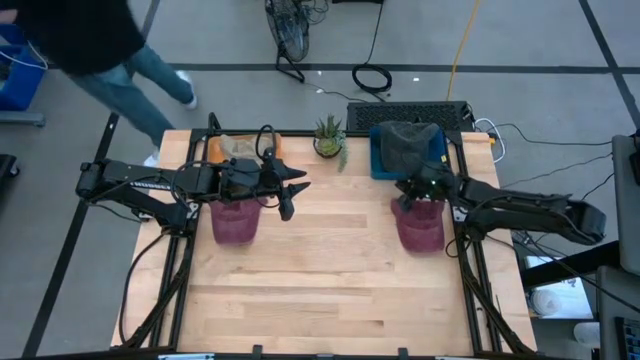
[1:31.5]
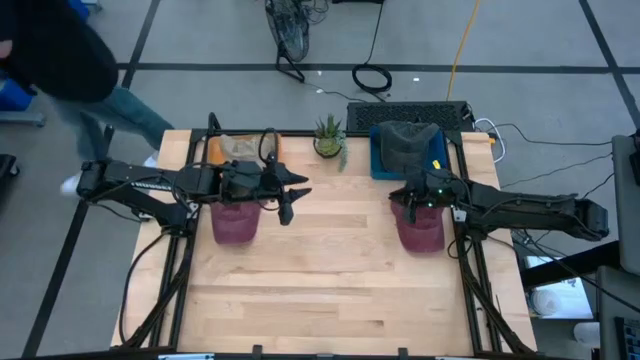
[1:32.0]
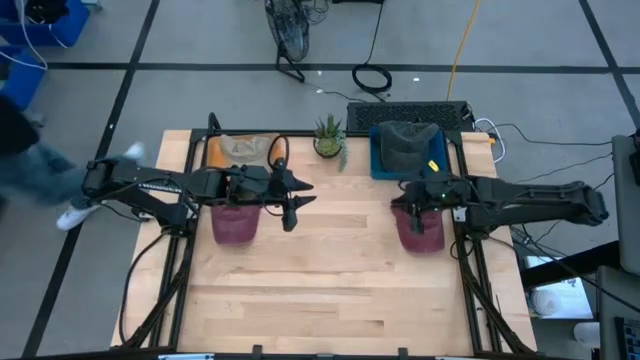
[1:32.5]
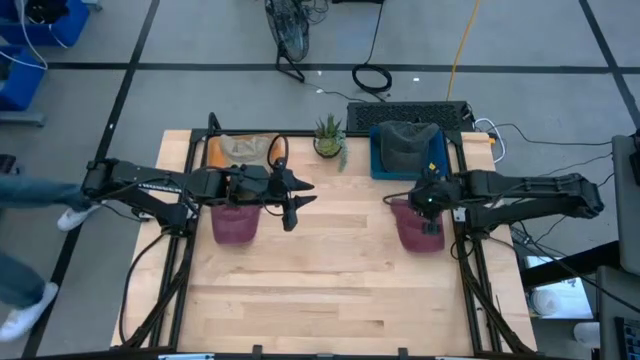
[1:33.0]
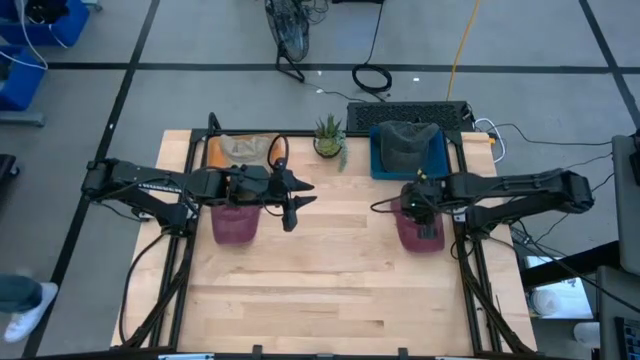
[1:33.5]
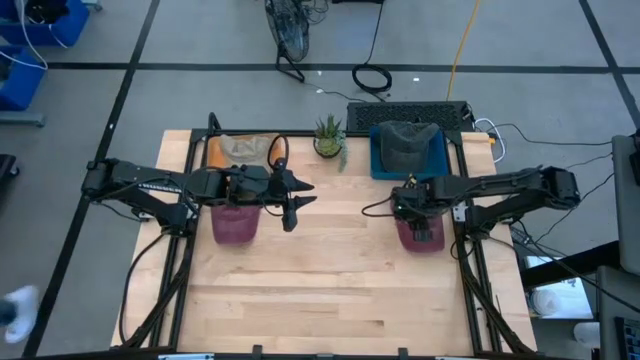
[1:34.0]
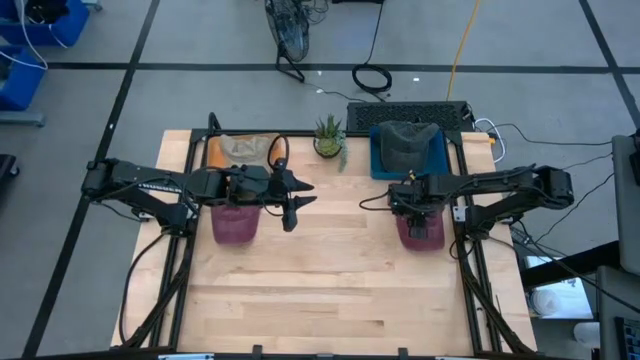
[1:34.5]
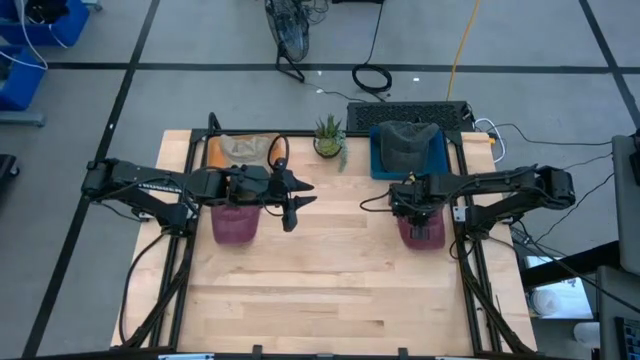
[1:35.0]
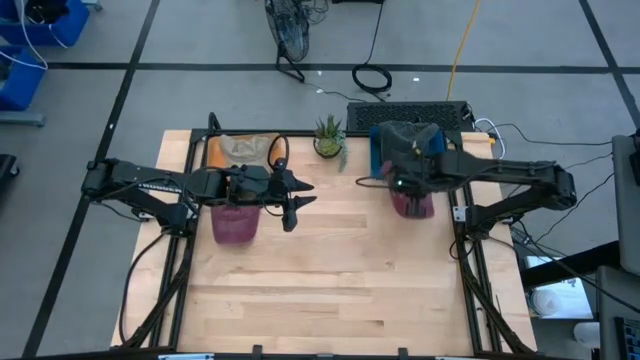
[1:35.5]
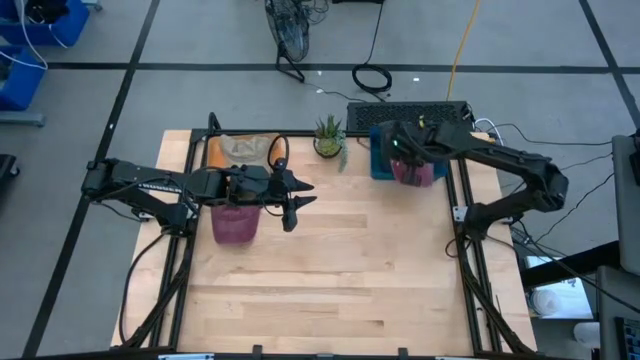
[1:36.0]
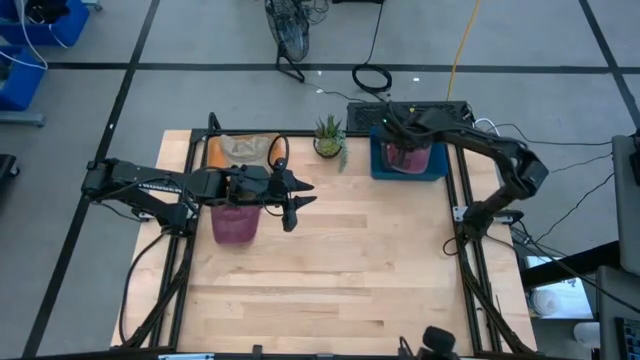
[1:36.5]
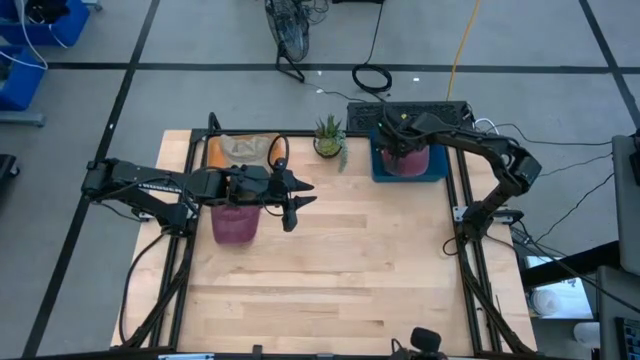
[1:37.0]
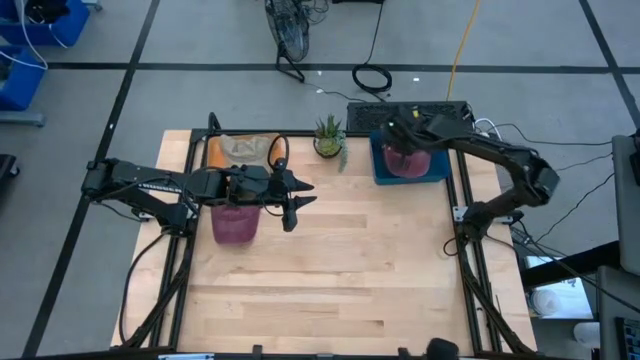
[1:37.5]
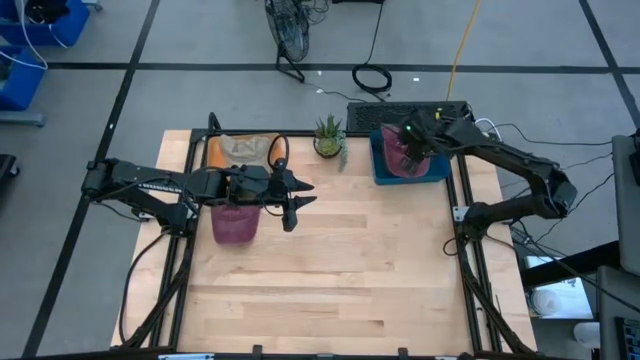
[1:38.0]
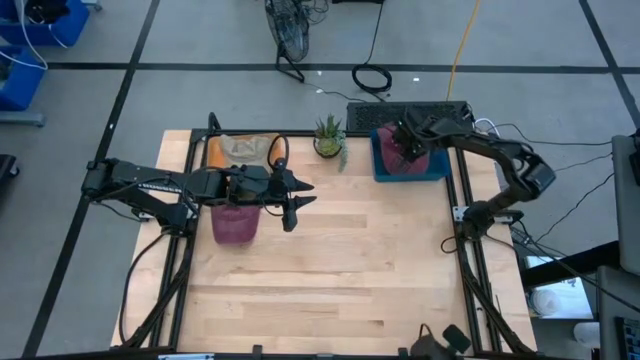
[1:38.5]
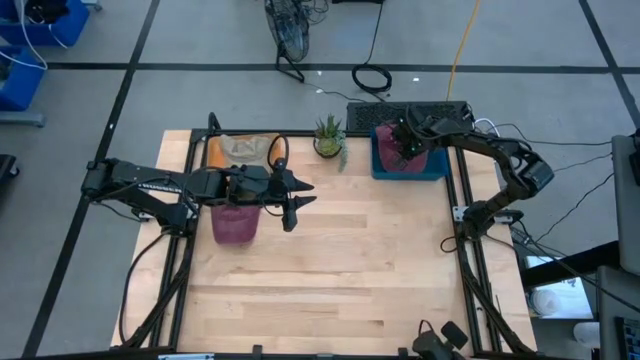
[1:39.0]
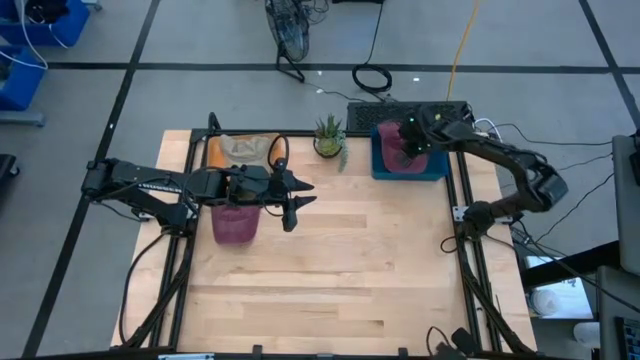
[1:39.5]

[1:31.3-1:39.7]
Task: Pick & Place hat
Put the right red cap into the blue bin

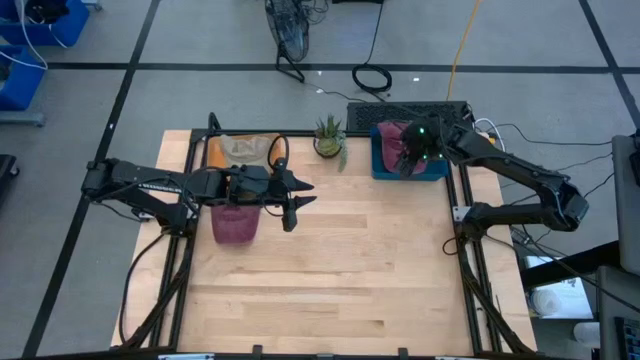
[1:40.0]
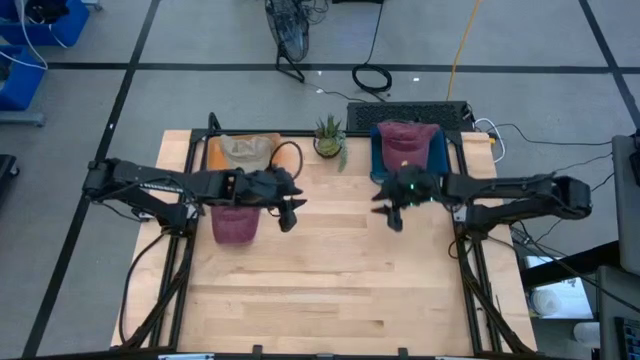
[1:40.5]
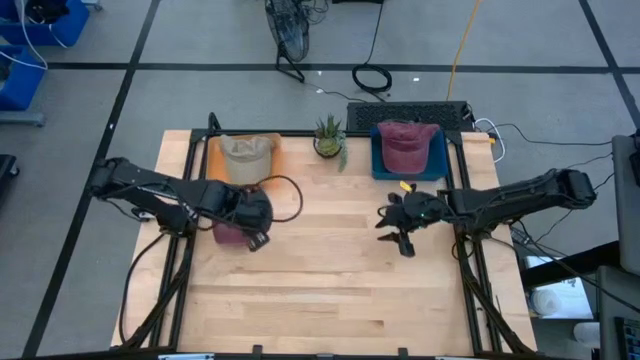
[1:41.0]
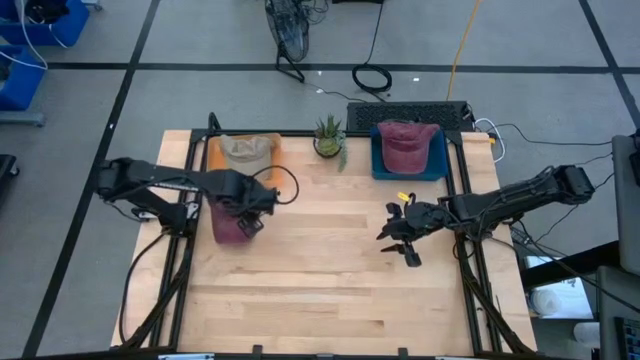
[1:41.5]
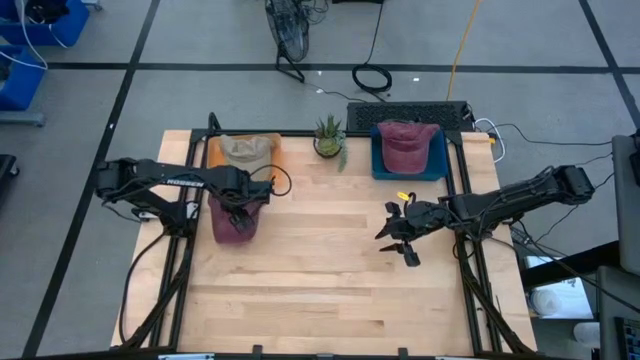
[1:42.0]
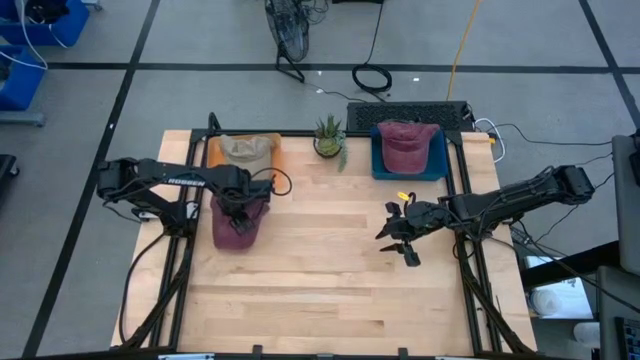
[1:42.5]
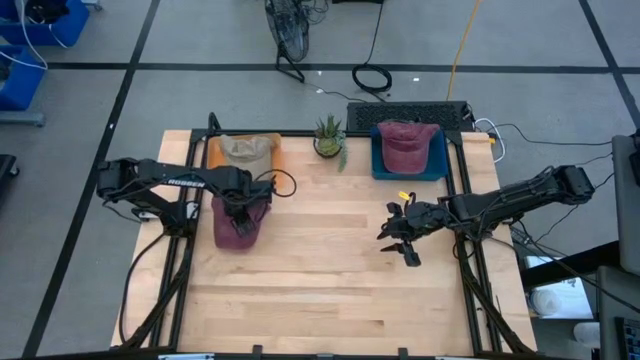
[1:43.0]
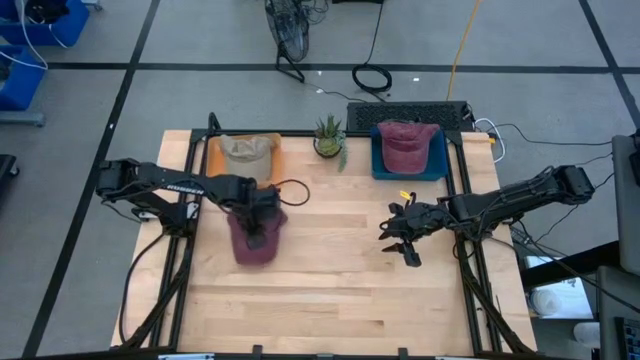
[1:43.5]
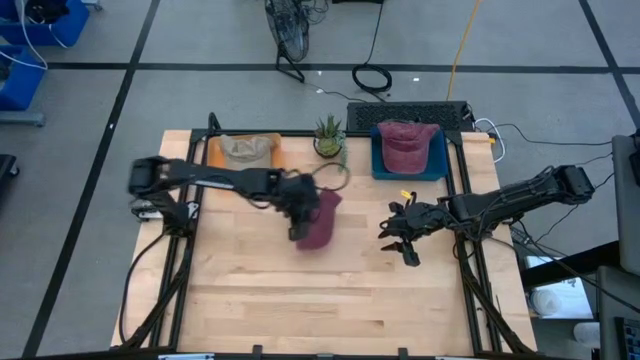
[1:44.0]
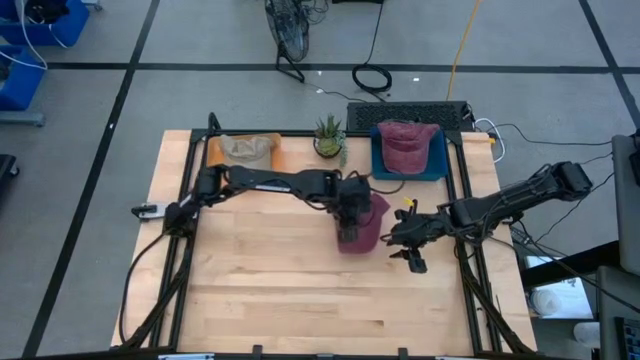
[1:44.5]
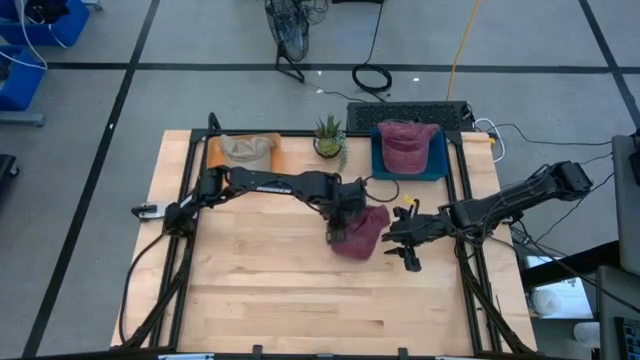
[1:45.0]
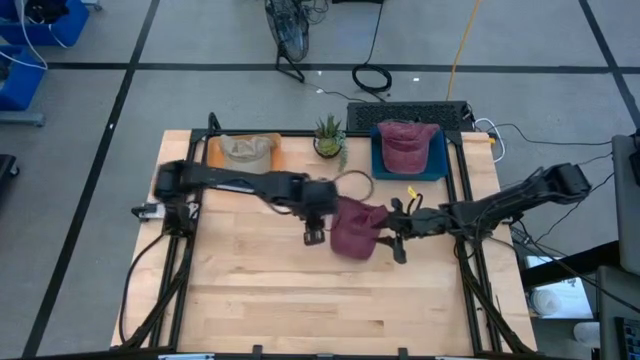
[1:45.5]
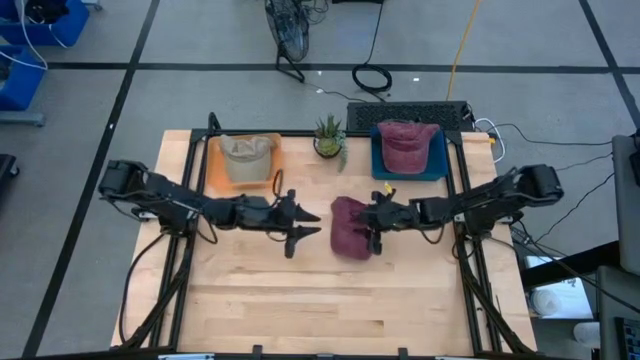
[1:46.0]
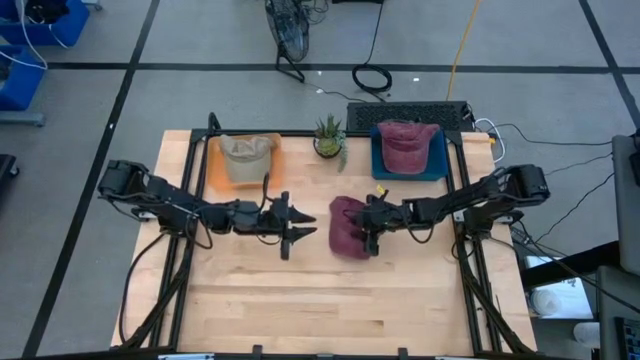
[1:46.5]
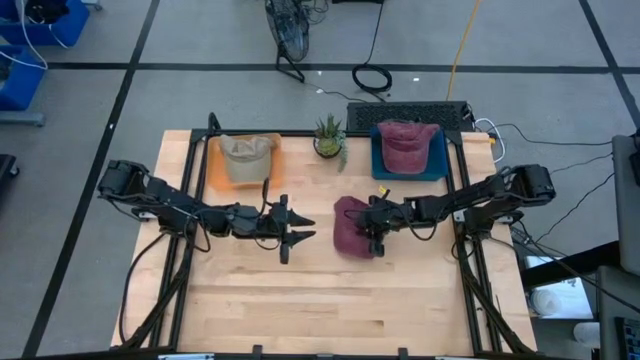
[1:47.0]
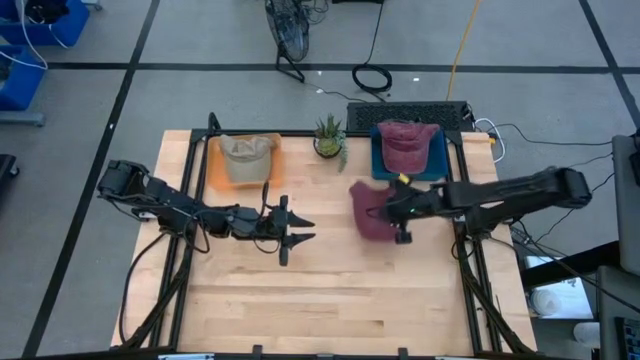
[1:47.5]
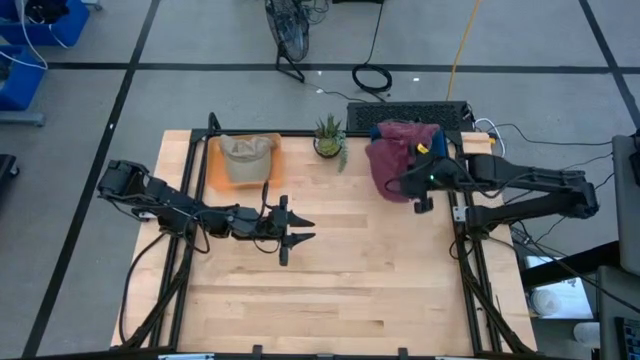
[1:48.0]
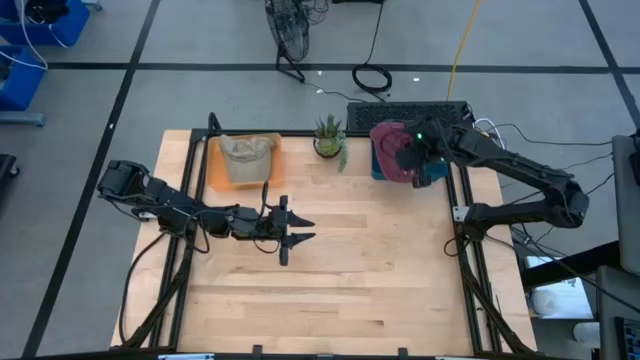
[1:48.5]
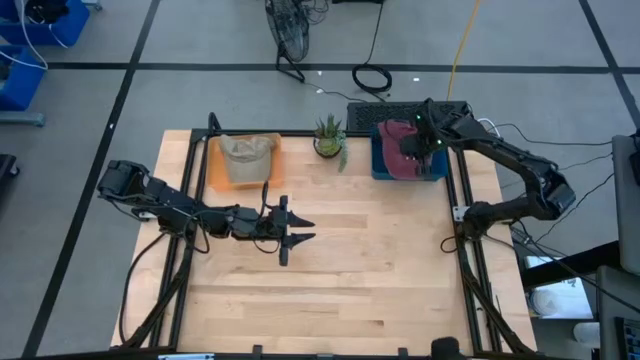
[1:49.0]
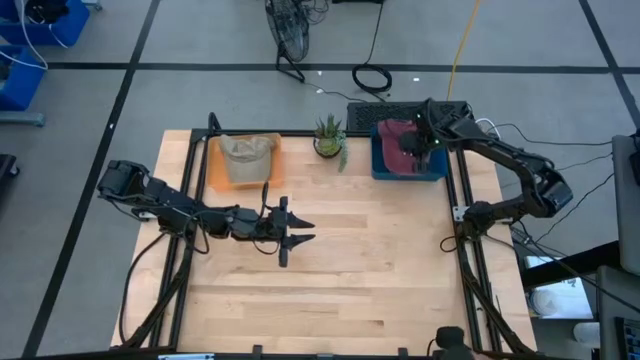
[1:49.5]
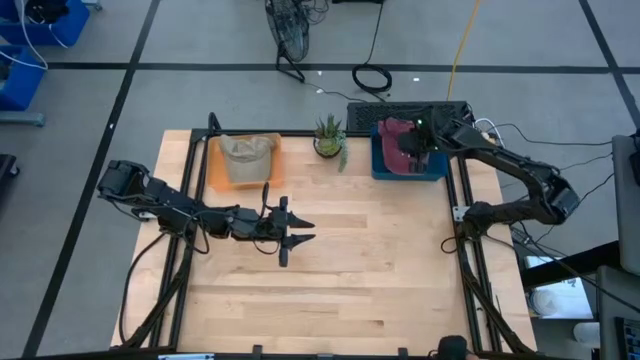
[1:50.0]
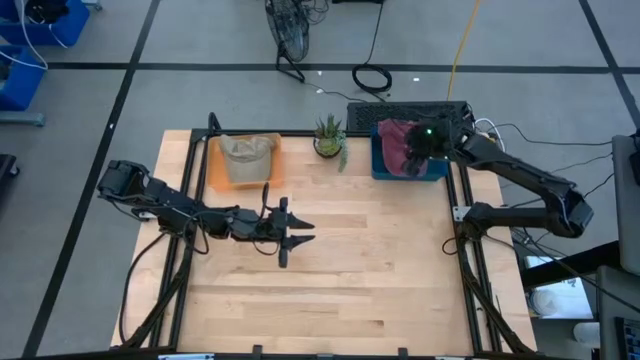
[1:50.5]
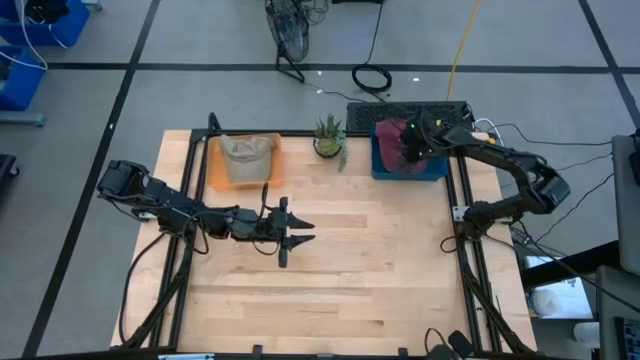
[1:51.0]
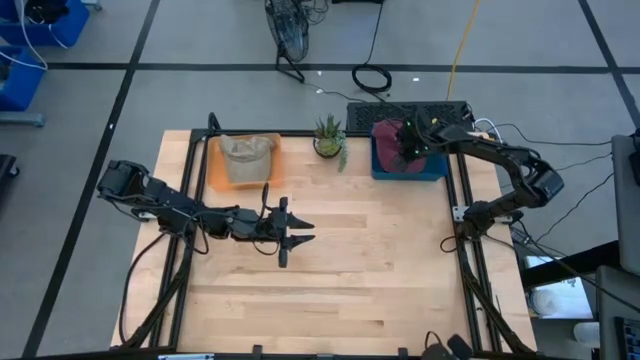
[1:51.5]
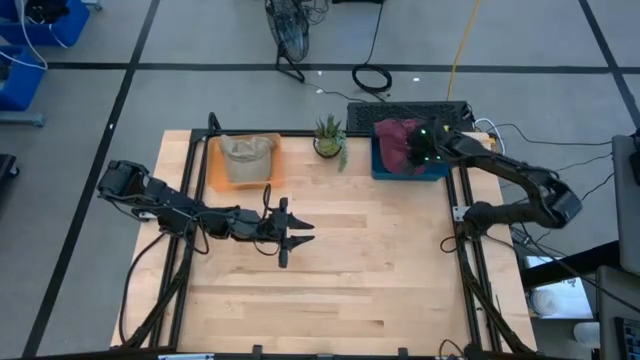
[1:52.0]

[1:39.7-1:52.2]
Put the red cap into the blue bin

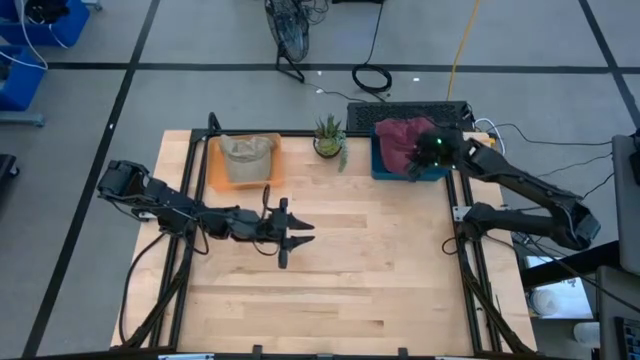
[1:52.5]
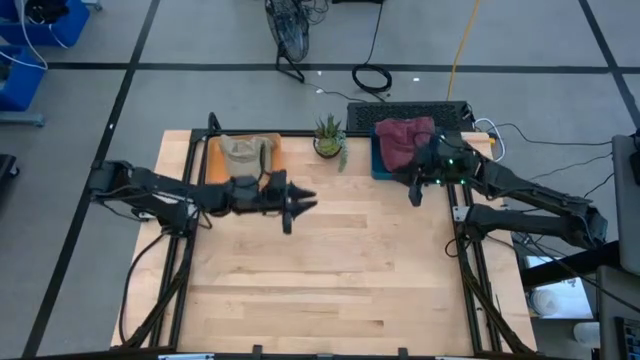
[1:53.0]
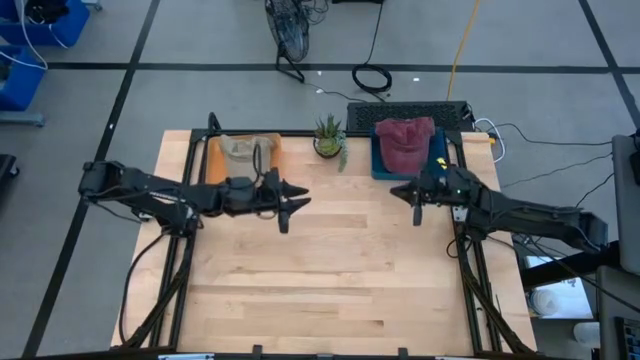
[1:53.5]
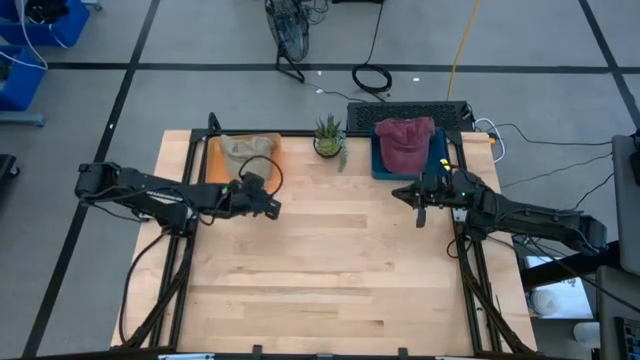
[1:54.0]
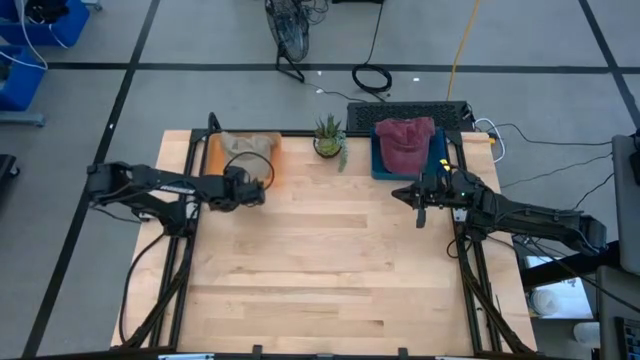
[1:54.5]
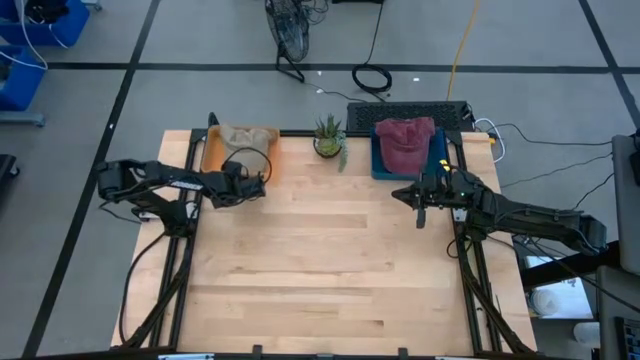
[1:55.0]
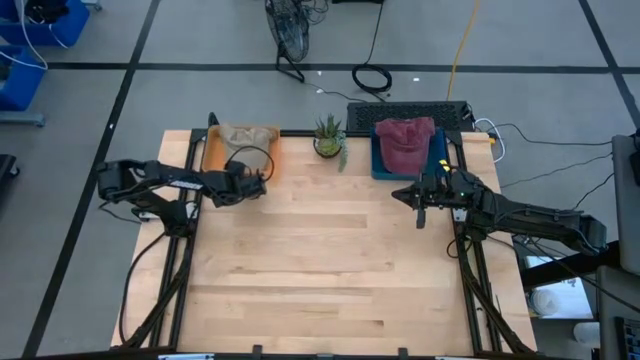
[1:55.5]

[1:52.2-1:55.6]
Adjust the orange bin
